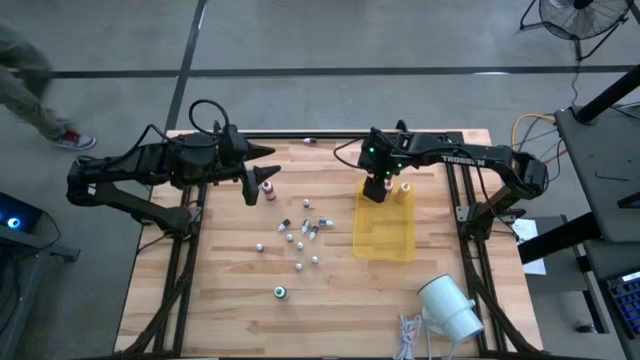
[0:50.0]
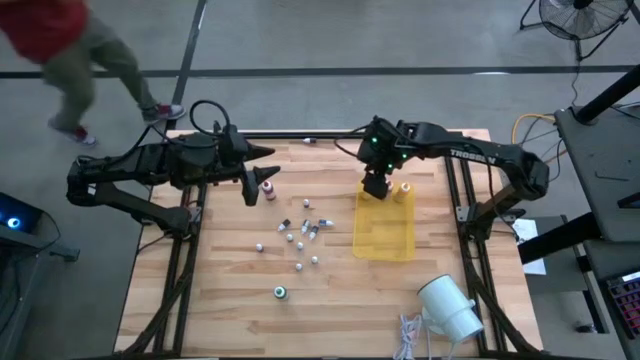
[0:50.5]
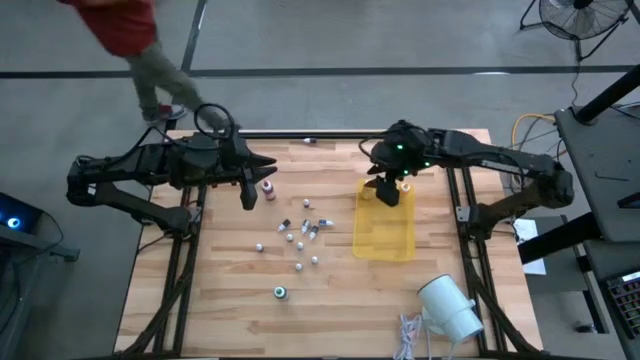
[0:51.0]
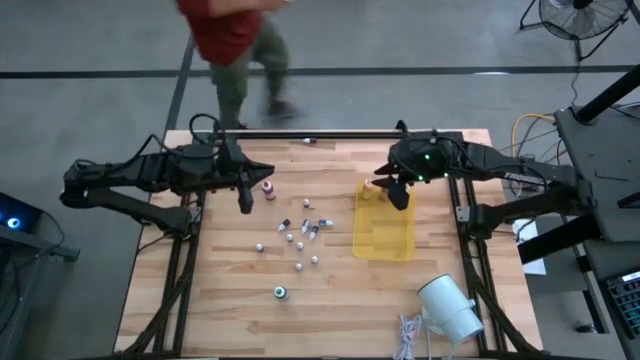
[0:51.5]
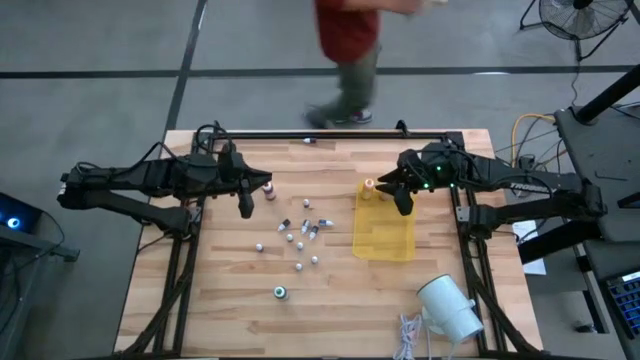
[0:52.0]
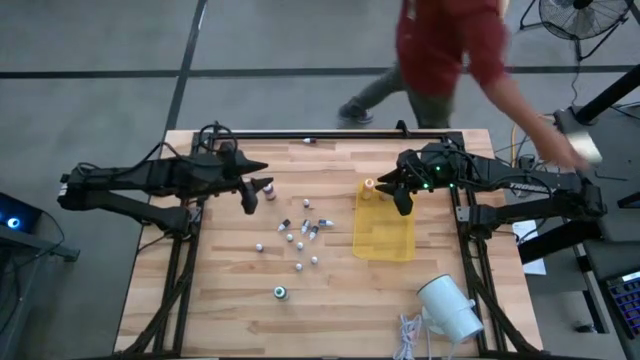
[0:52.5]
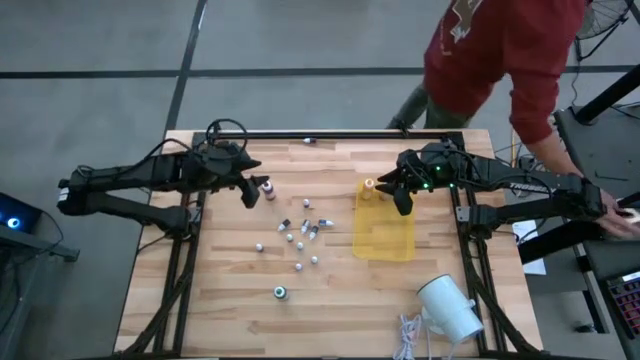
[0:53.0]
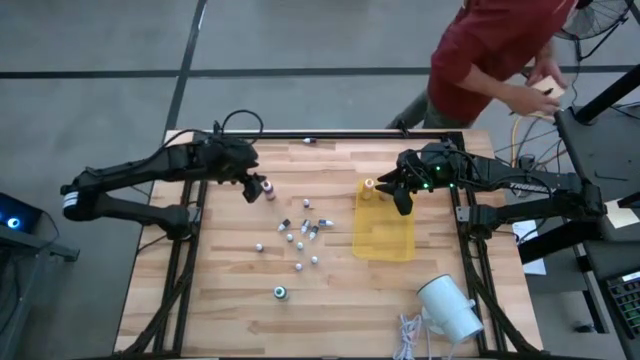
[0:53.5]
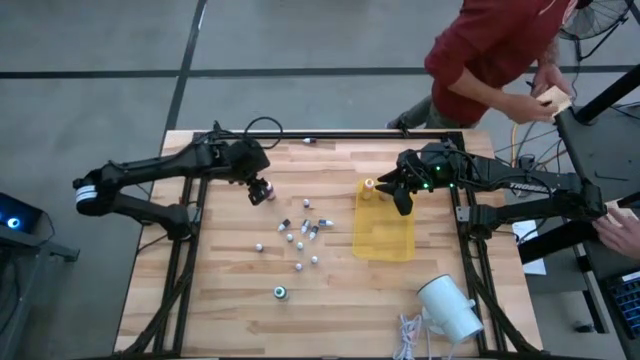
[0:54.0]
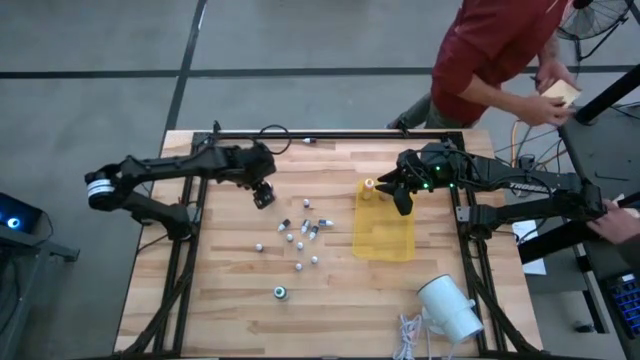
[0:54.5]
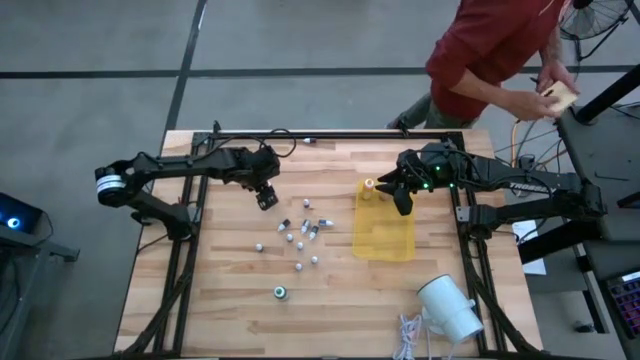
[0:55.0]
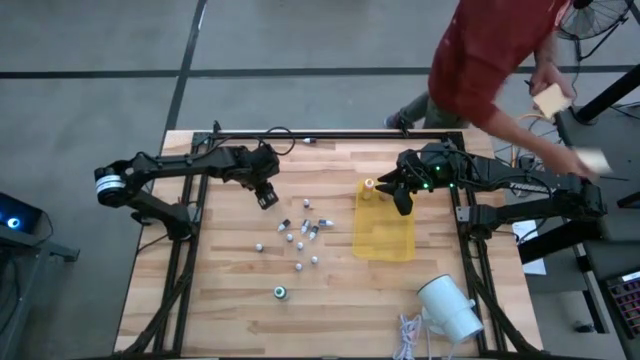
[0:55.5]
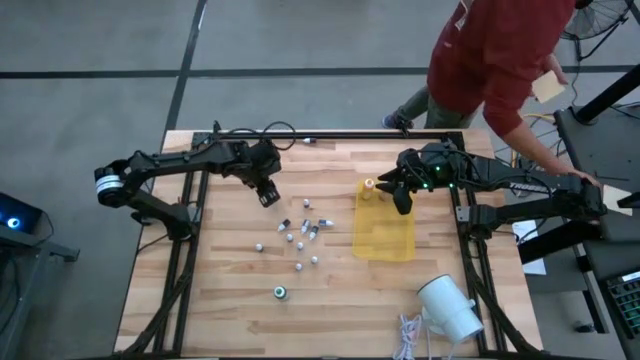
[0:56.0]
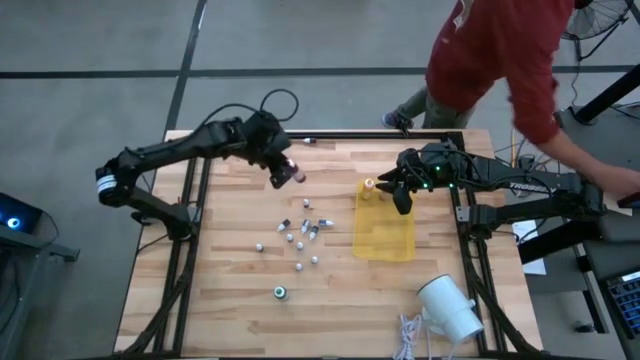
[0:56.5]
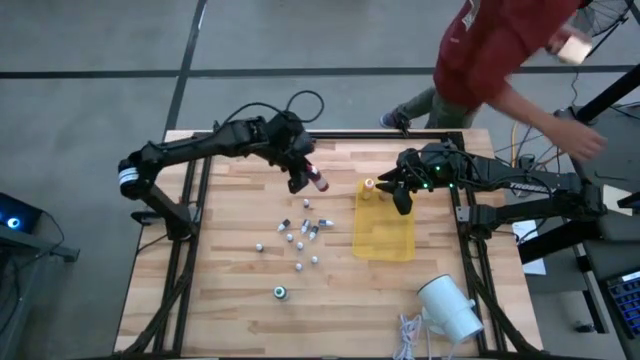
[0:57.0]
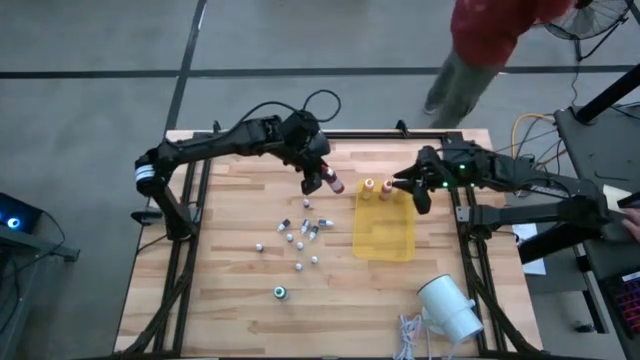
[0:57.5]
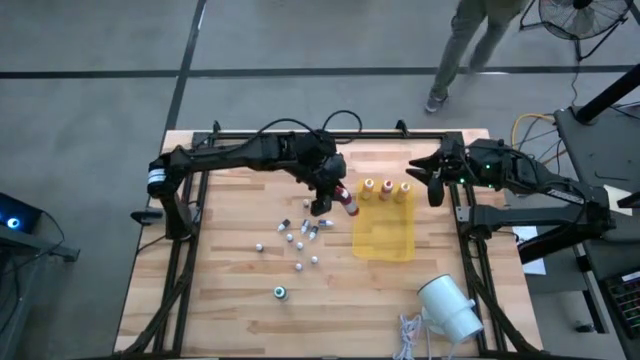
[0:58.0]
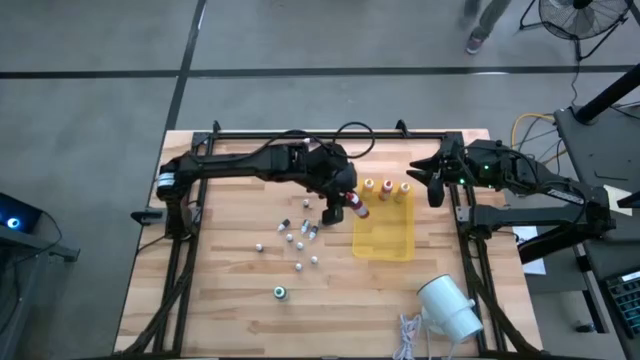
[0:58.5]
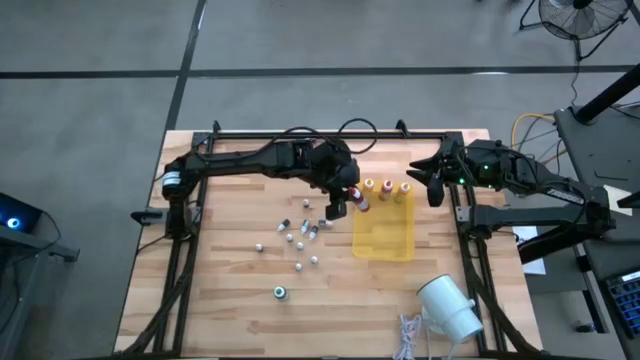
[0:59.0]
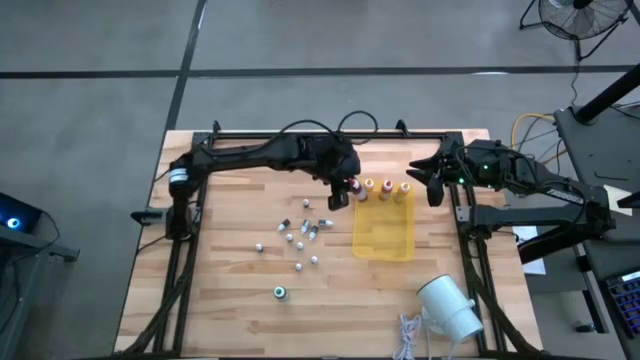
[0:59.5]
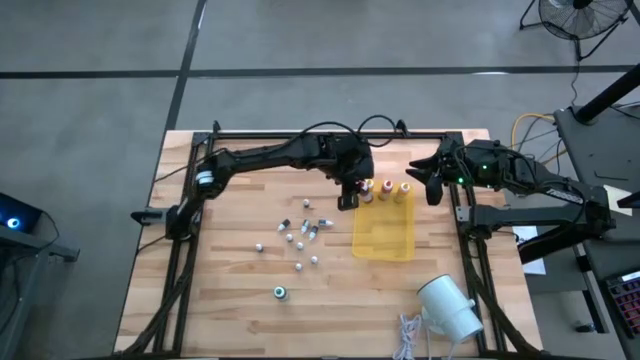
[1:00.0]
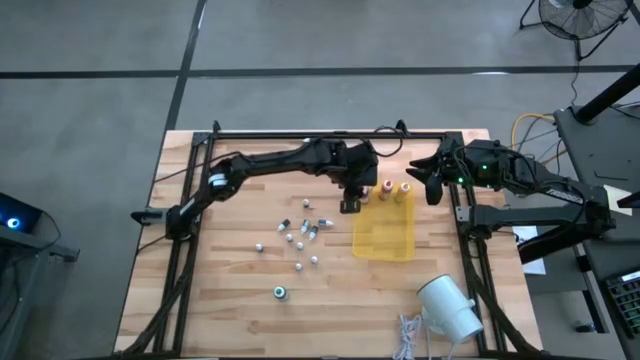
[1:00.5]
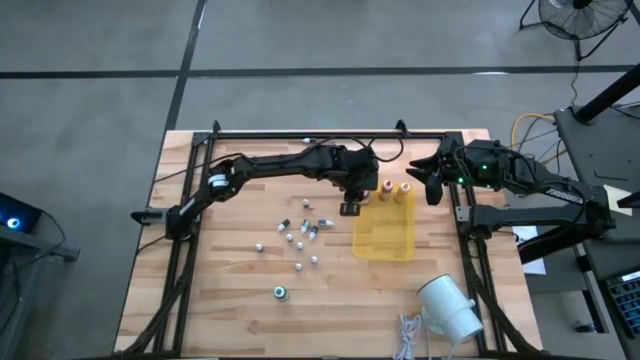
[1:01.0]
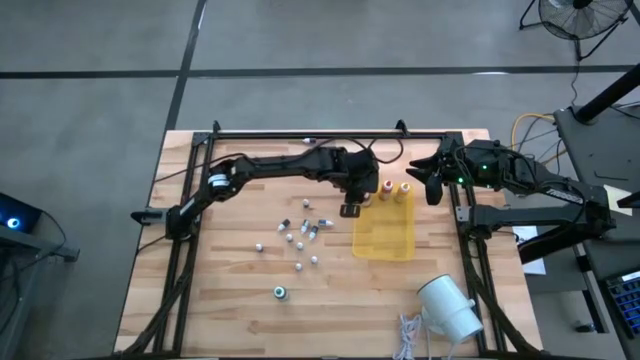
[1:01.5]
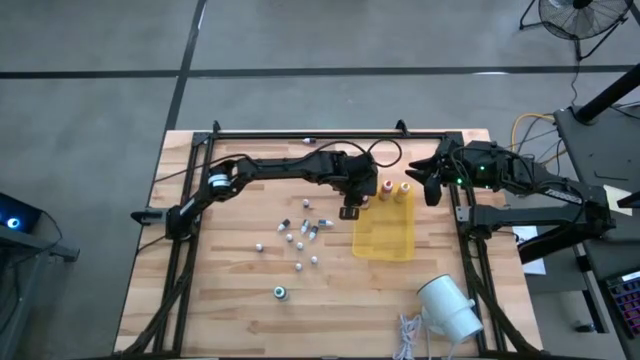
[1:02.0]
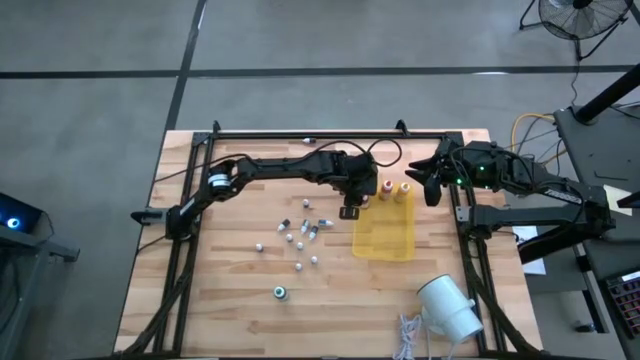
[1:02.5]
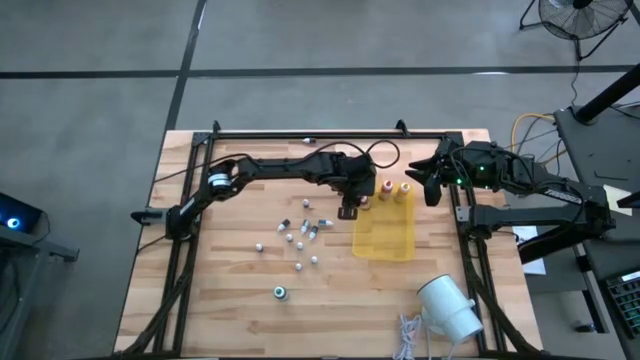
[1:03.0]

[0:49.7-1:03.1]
Task: Pick & Place food coloring
Put the big red food coloring bottle into the yellow bin

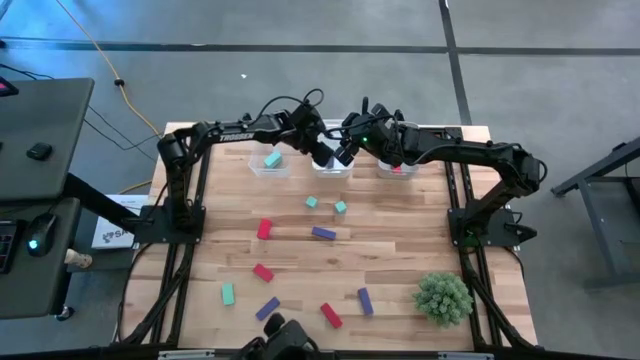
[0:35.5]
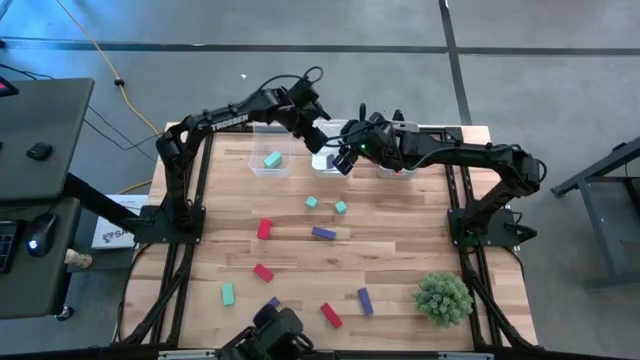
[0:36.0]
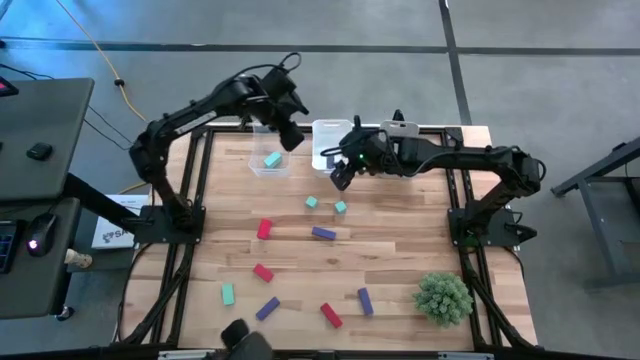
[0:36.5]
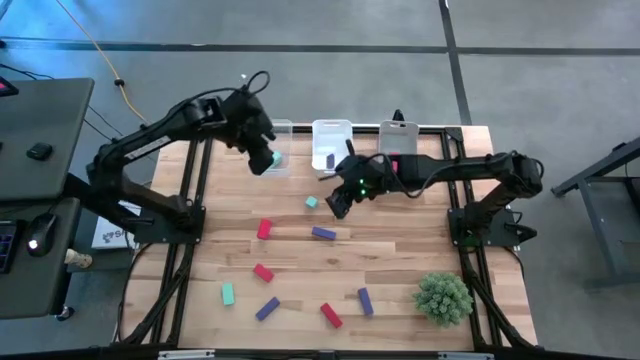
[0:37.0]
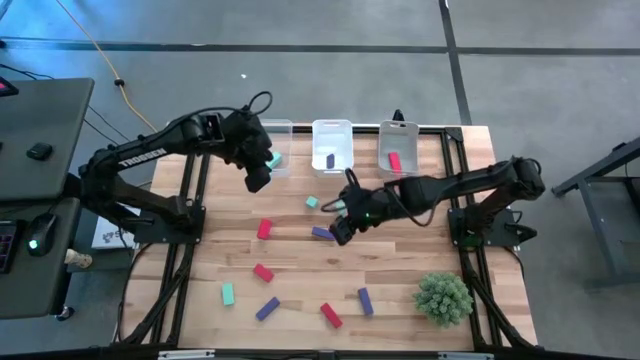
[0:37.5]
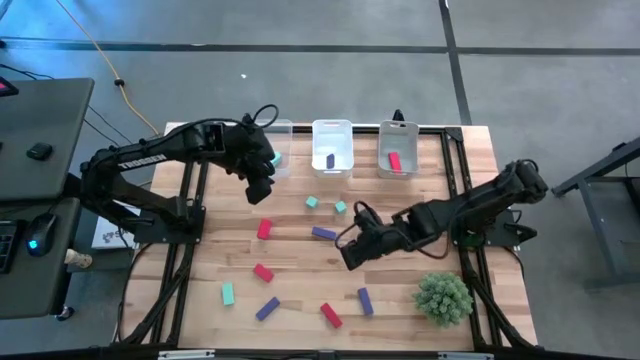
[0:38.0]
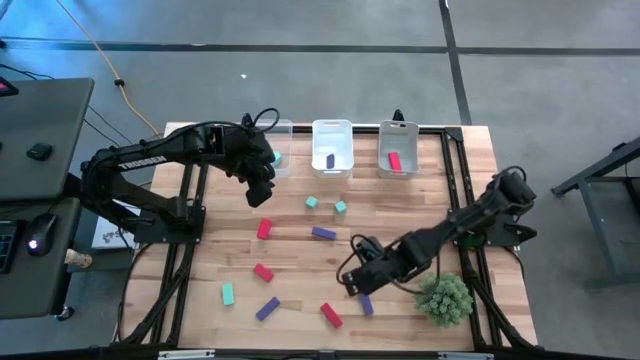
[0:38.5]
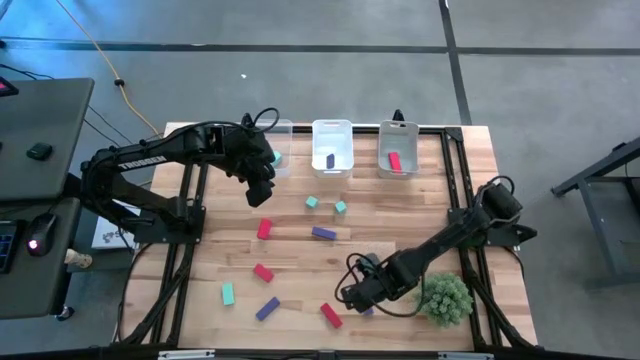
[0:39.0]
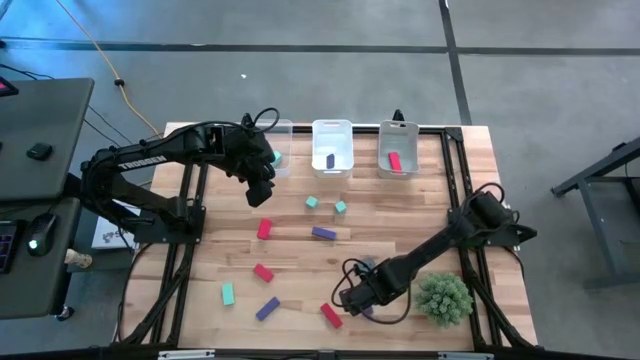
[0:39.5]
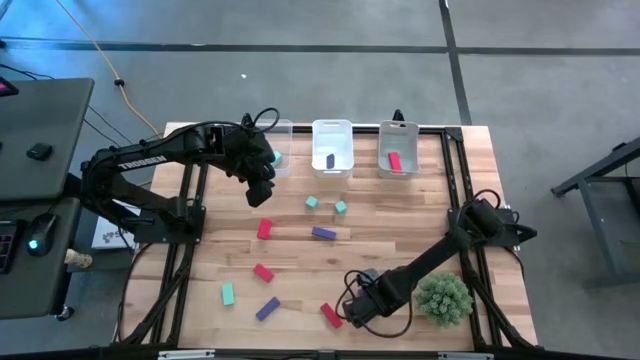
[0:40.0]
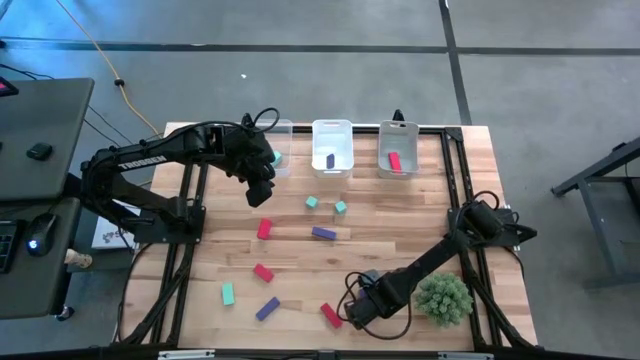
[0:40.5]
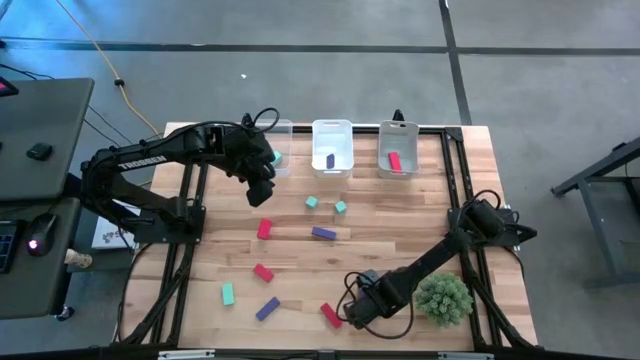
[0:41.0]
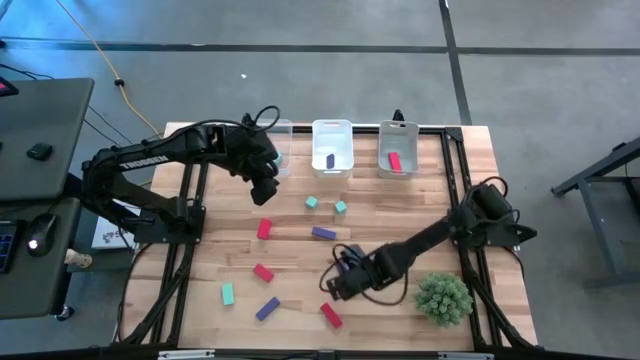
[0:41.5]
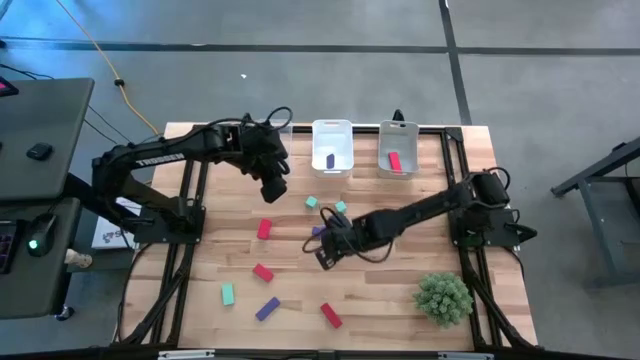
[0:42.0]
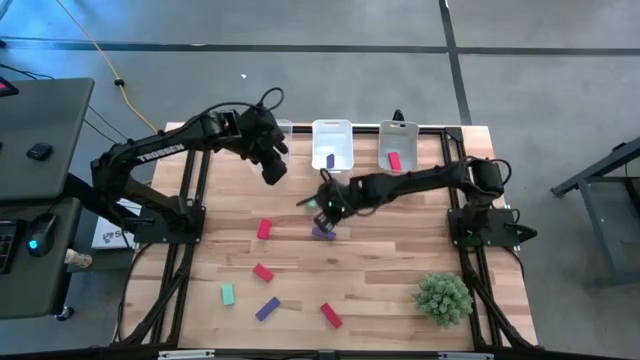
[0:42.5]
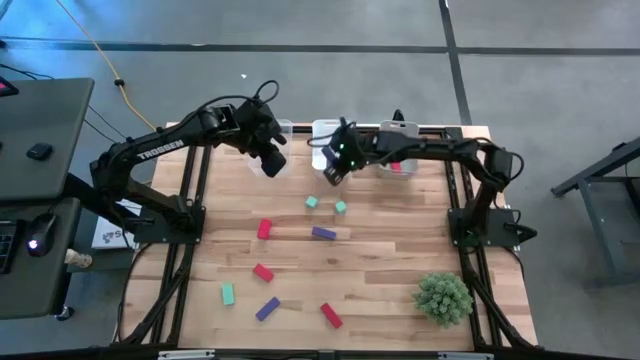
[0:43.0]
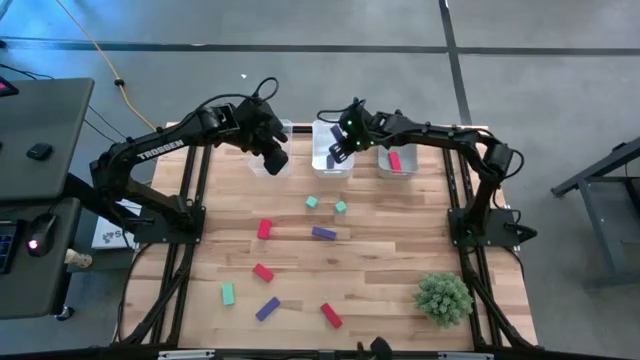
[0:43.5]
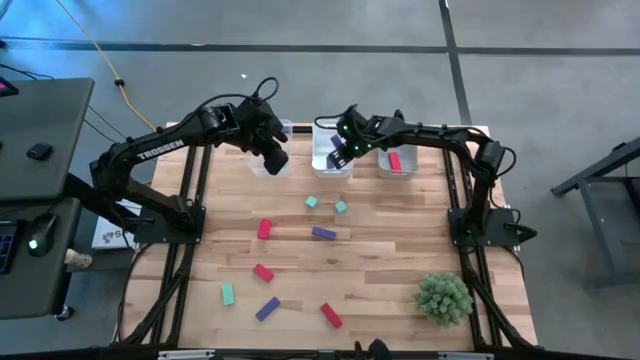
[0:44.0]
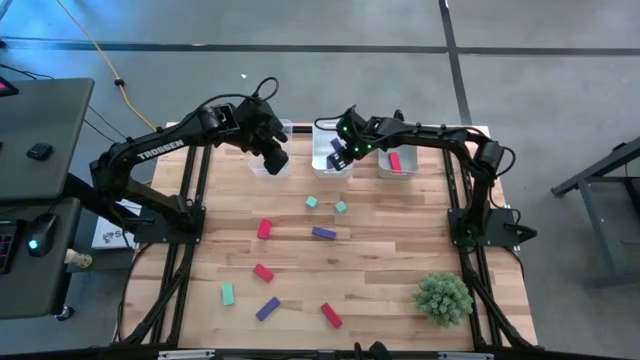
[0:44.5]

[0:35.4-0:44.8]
Task: Sort & place blocks by color
Put the blue block into the white bin
